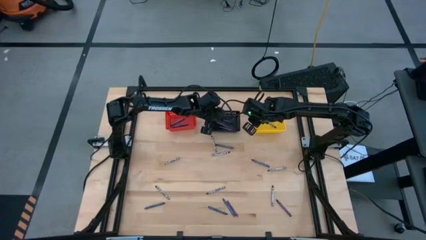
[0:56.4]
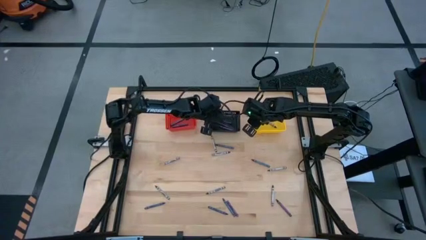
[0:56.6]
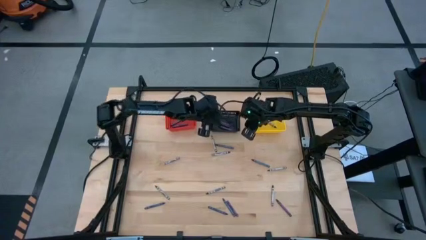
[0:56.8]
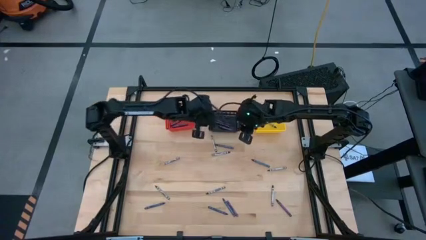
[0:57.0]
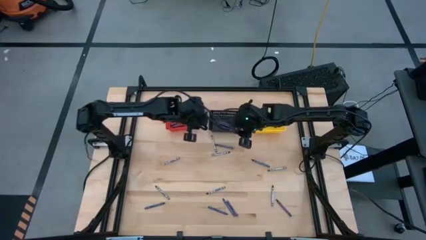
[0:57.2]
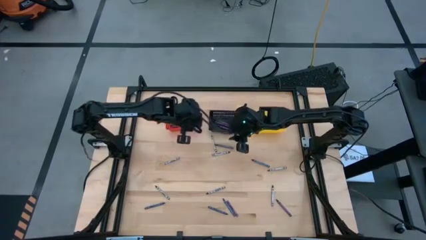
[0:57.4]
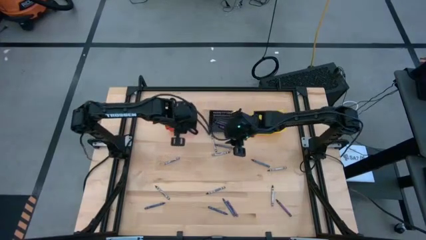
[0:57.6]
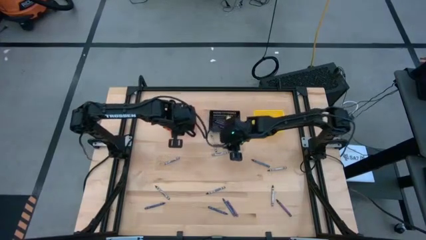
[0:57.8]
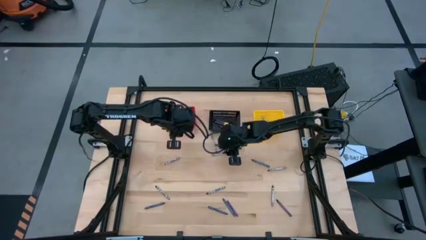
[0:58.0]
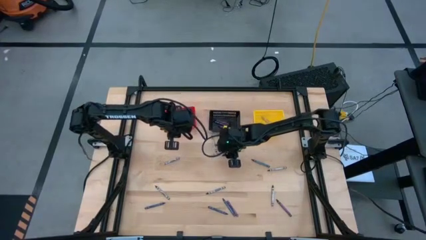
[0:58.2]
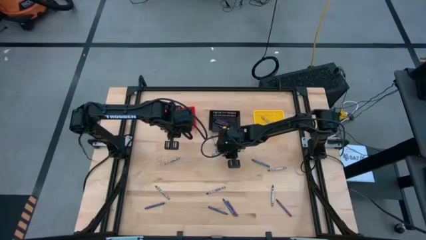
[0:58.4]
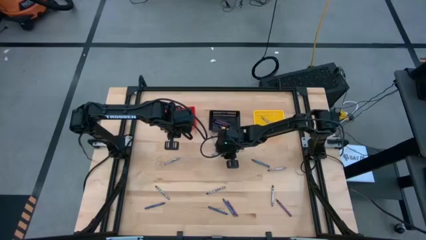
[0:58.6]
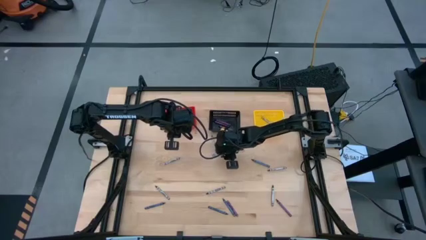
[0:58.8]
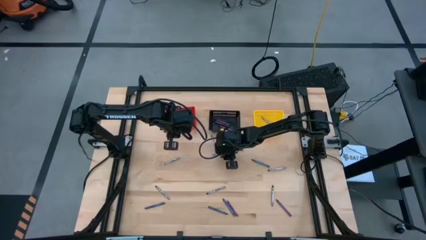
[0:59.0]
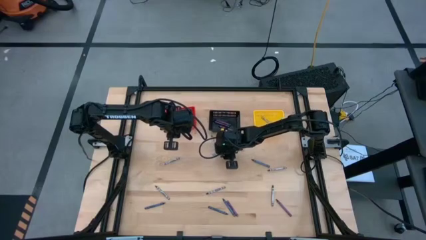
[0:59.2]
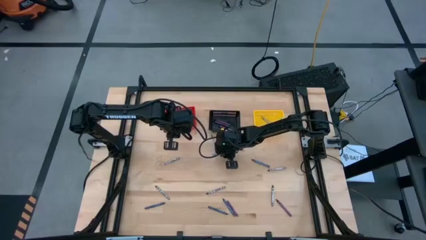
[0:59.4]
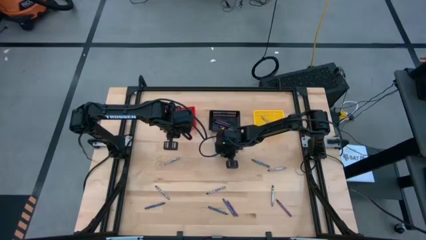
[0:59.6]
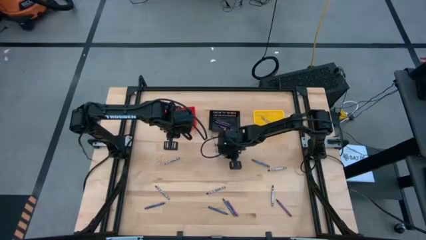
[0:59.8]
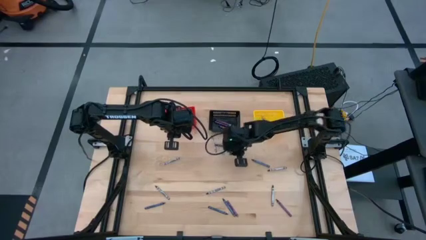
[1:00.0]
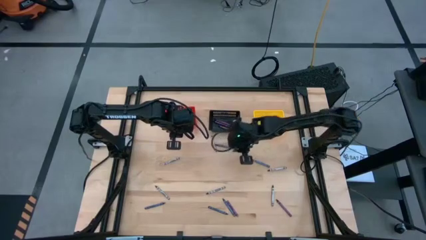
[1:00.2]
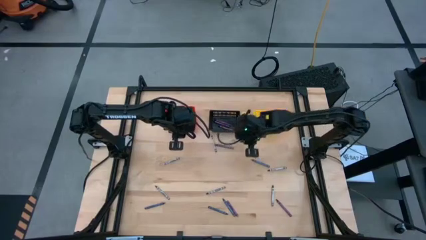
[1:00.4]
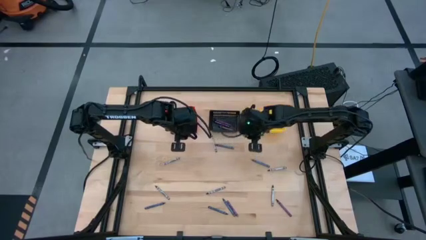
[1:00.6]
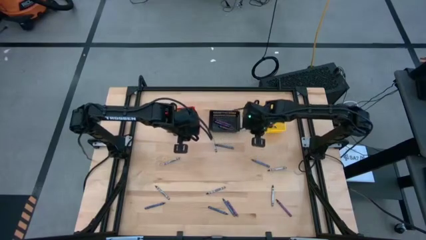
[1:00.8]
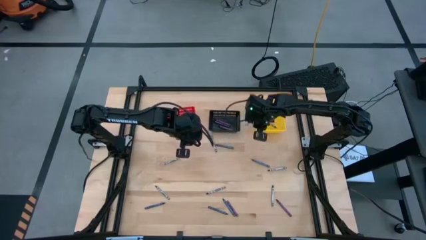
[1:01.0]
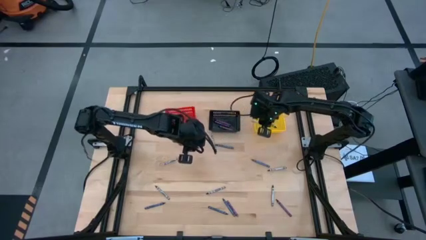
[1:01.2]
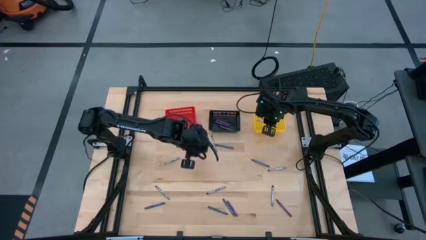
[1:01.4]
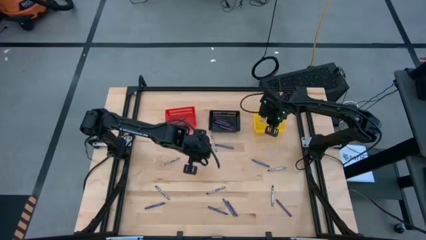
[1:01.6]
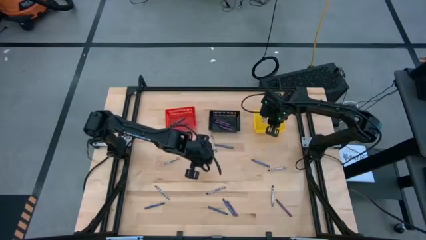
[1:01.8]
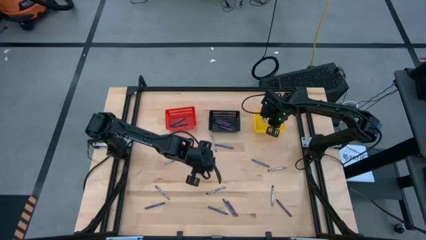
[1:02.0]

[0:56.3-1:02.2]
Task: Sort crayons
Put the black crayon into the yellow bin

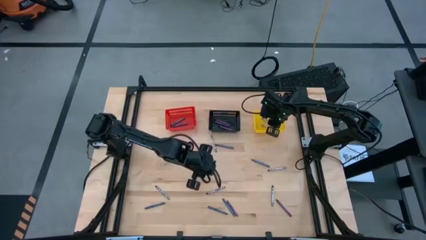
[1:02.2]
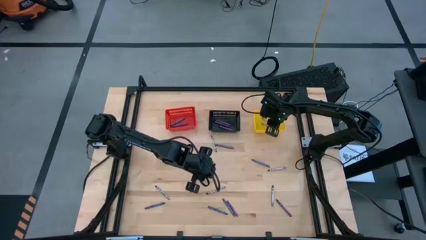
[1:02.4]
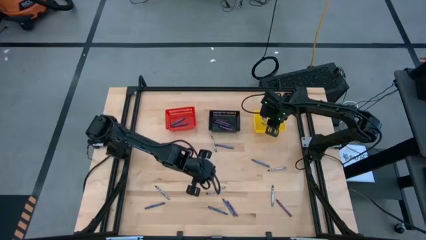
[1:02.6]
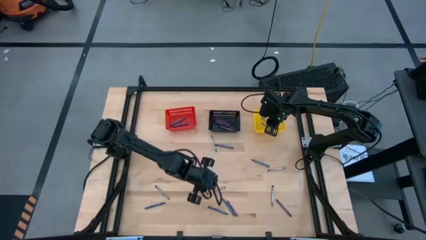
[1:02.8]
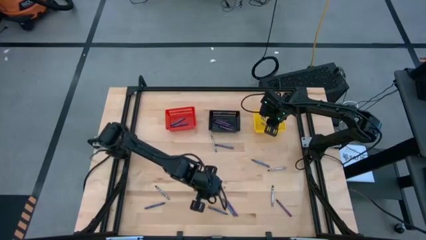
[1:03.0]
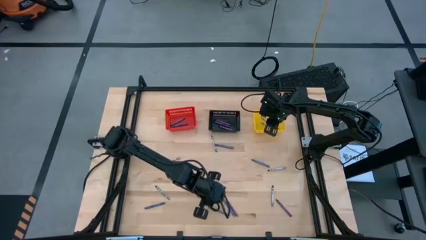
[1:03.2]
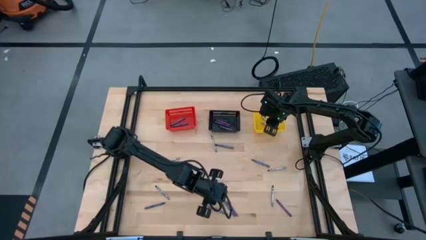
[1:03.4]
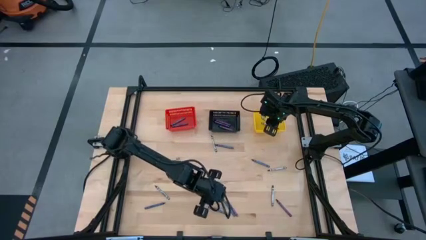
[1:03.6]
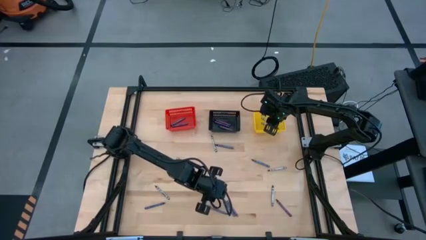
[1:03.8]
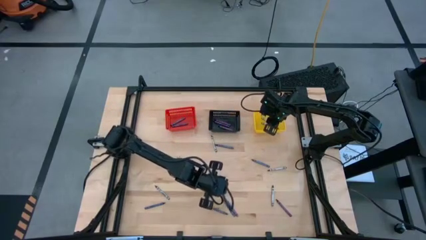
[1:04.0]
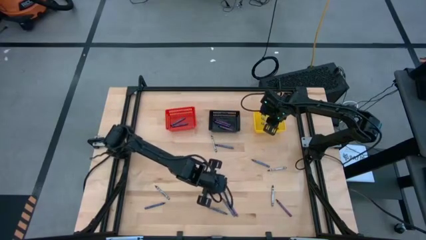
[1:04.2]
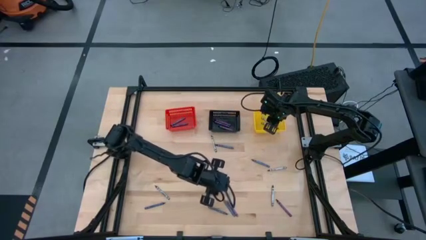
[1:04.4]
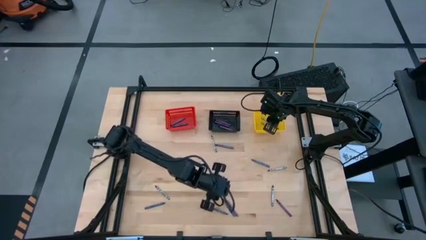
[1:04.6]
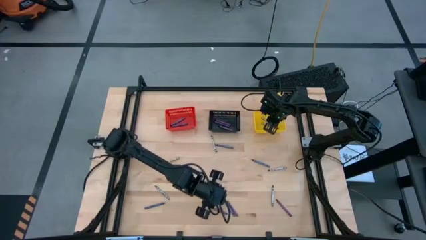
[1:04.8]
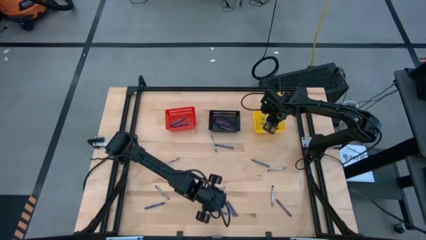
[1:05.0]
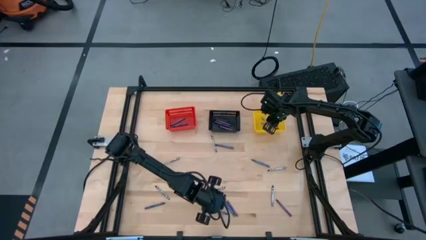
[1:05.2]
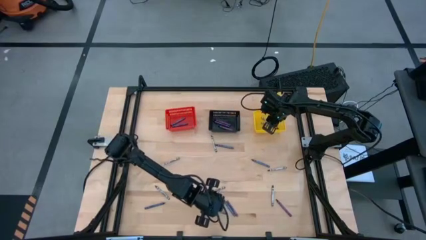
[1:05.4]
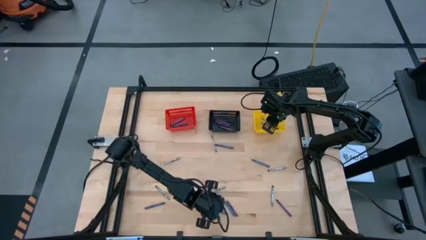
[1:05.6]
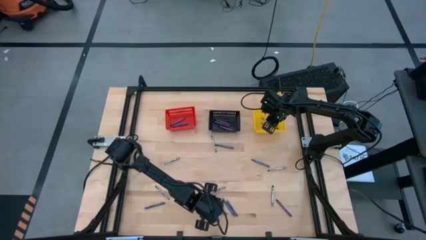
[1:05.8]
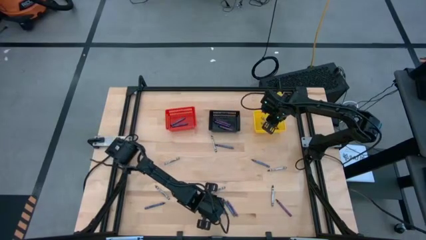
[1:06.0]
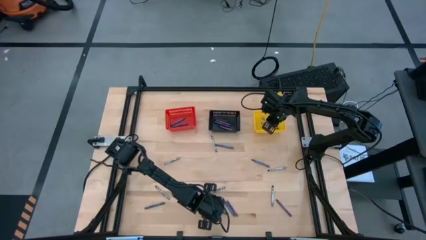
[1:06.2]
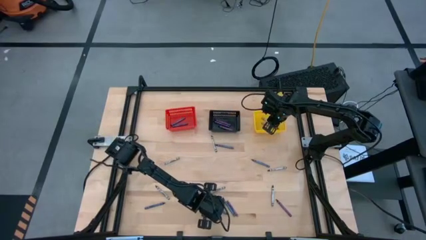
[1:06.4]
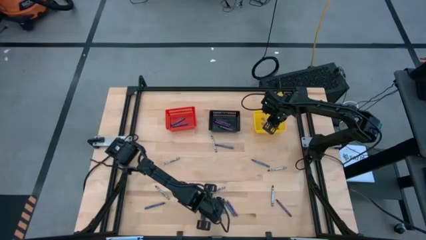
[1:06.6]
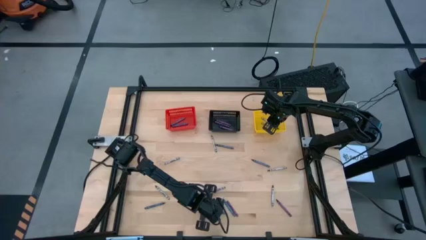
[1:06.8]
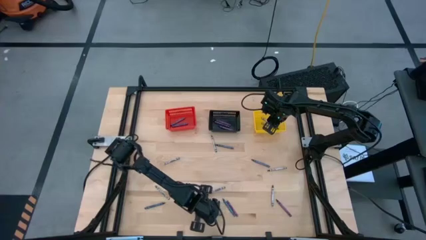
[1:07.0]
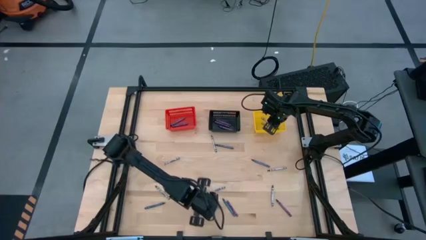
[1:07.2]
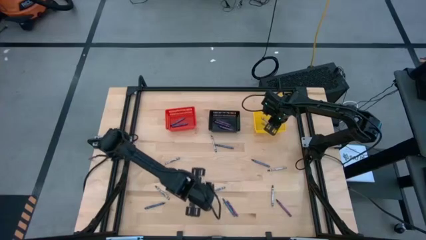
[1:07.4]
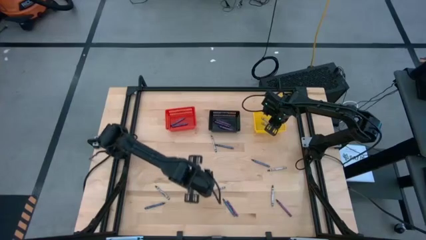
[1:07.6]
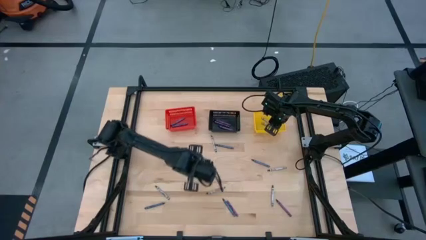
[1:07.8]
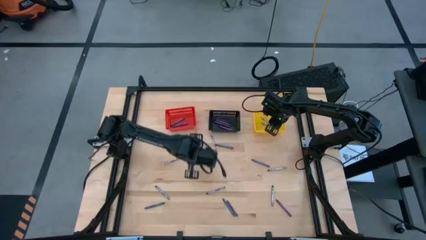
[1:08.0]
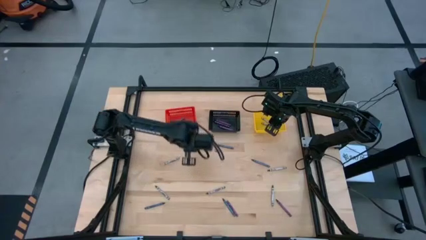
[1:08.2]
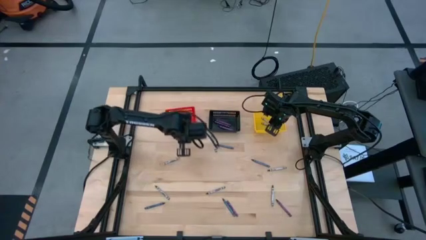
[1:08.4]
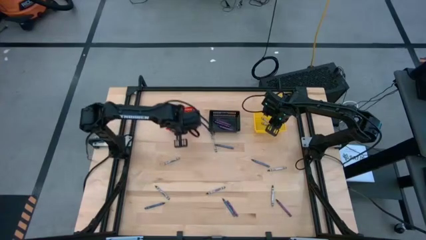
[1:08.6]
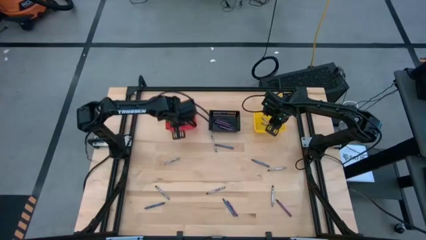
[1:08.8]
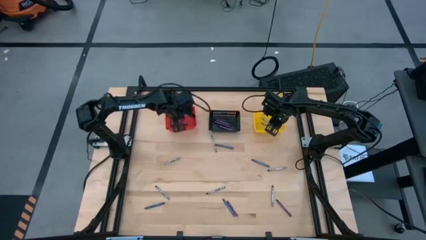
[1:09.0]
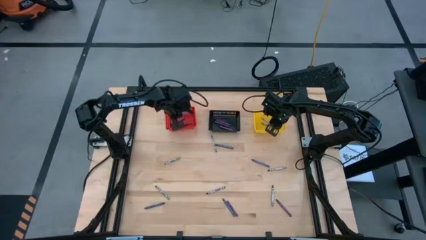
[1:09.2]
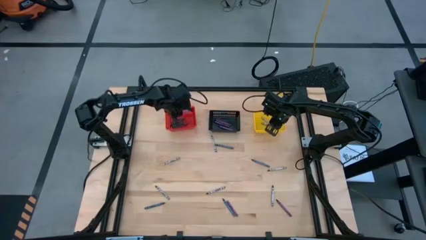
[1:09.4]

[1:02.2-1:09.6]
Put the blue crayon into the red bin

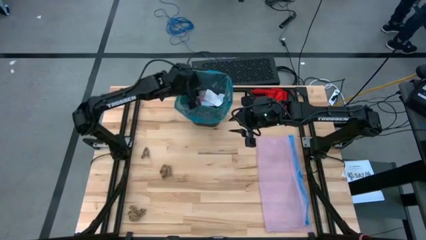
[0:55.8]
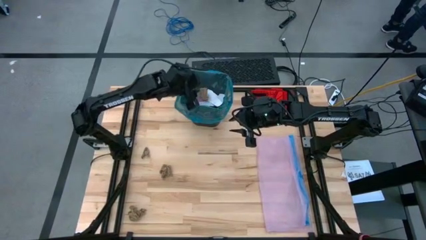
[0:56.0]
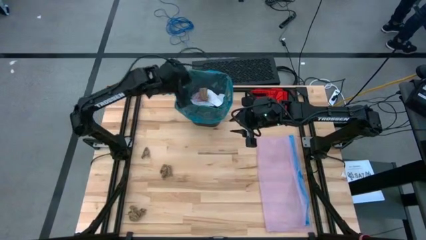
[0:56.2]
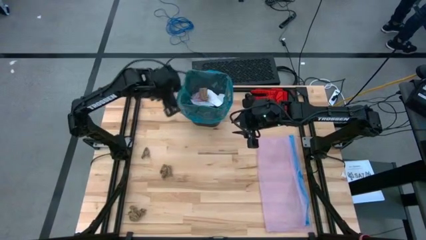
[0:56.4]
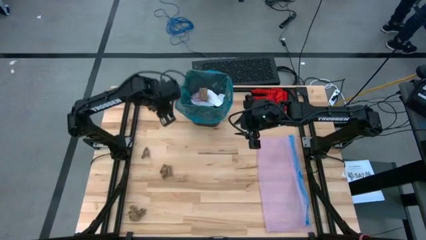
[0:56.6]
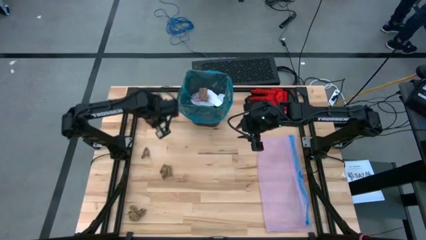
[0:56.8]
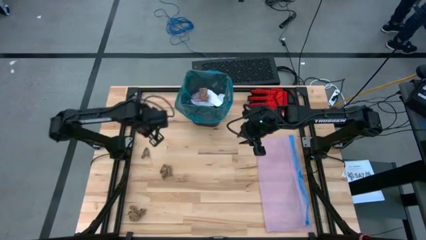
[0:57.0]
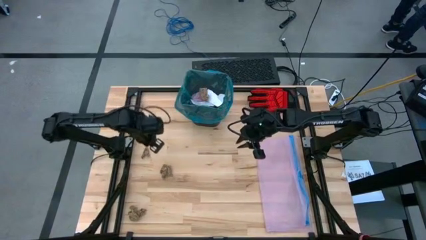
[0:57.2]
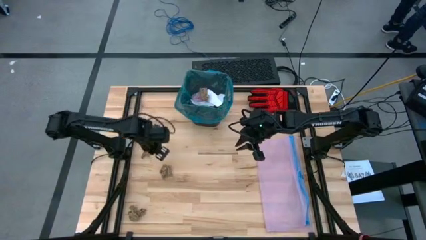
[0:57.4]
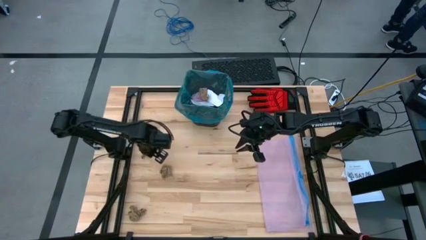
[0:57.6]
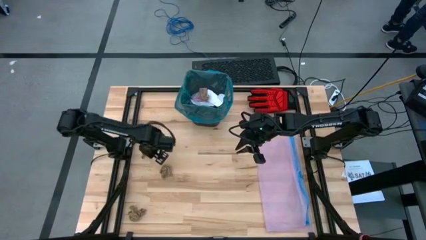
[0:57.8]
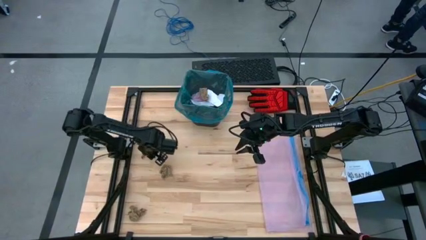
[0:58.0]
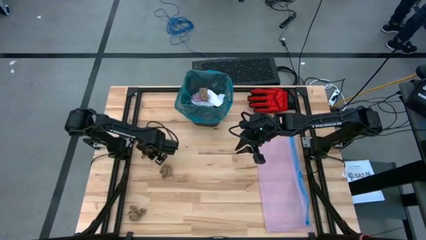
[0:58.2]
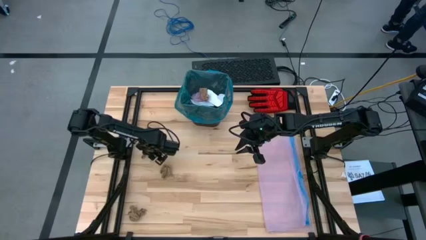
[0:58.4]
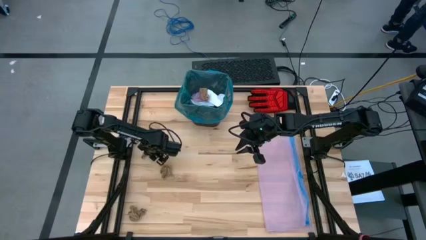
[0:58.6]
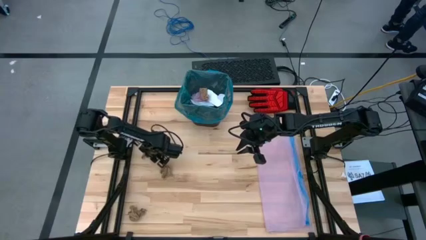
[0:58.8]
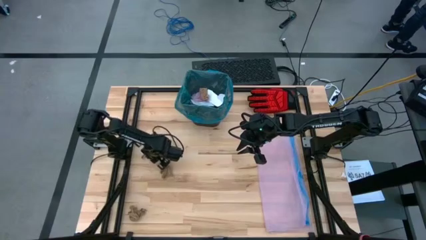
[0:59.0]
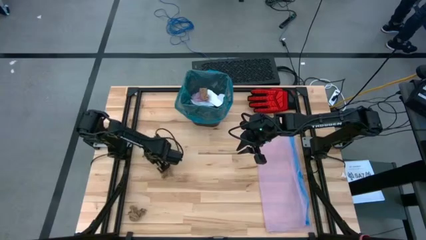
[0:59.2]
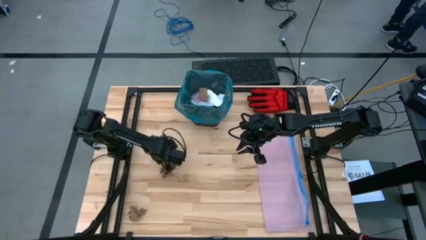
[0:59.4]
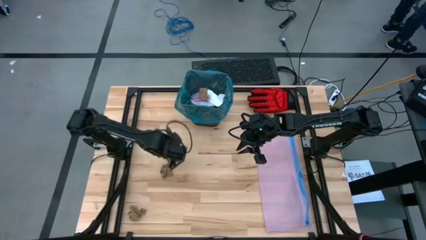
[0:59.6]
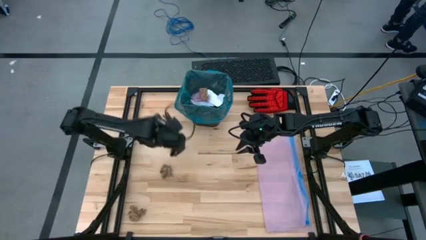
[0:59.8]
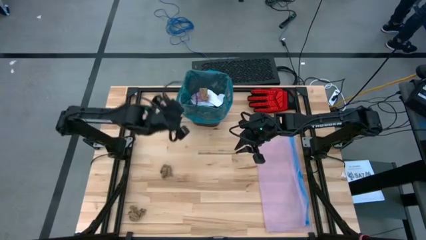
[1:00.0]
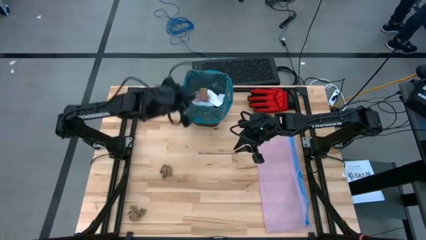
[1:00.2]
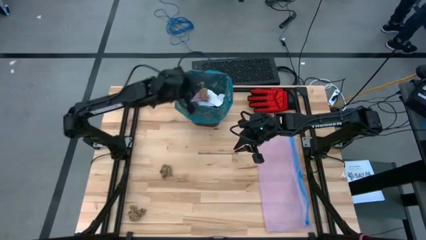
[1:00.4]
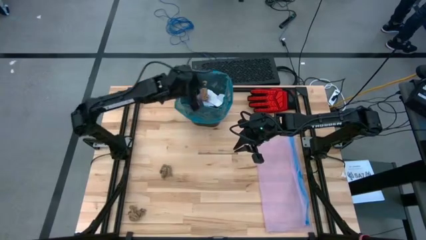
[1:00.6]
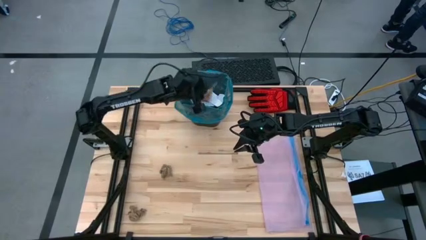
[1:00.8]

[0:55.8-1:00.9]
Task: place trash/remove bag and relplace
Put the brown napkin into the trash bin
